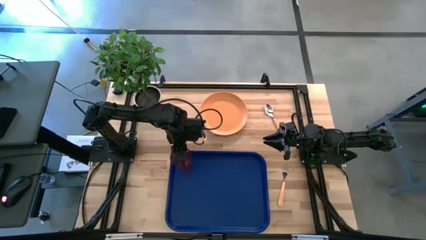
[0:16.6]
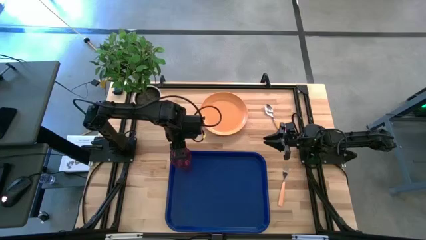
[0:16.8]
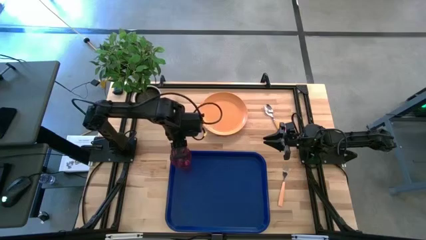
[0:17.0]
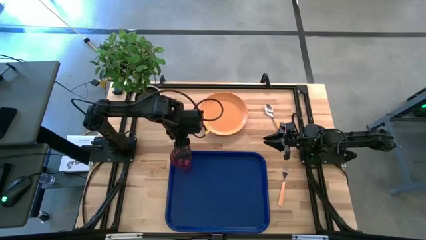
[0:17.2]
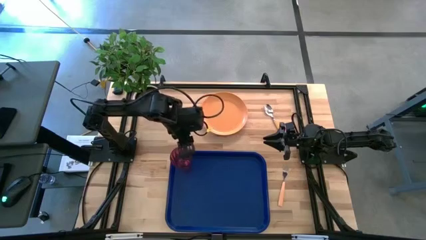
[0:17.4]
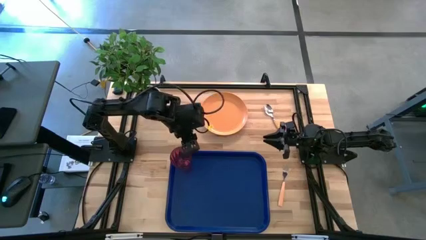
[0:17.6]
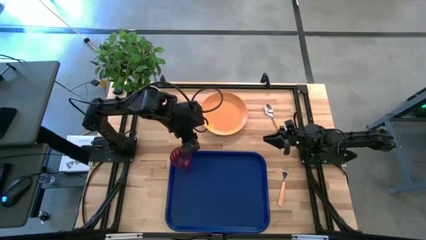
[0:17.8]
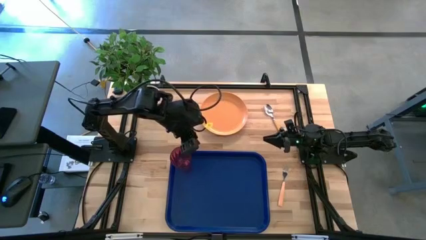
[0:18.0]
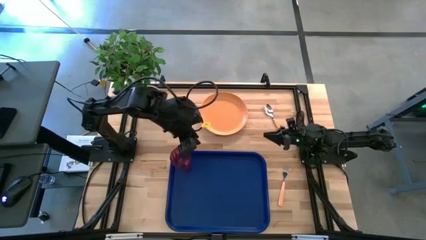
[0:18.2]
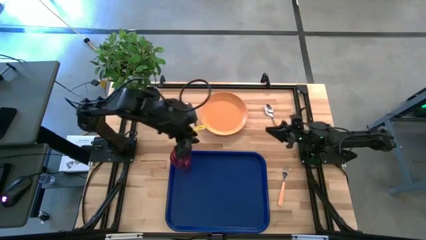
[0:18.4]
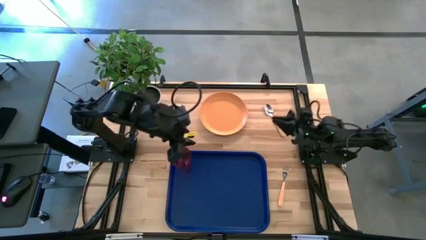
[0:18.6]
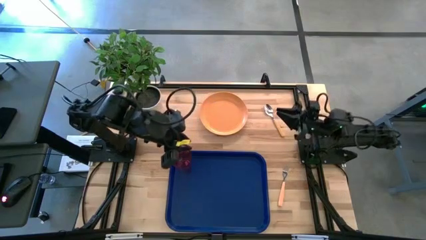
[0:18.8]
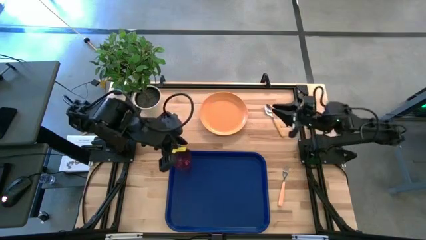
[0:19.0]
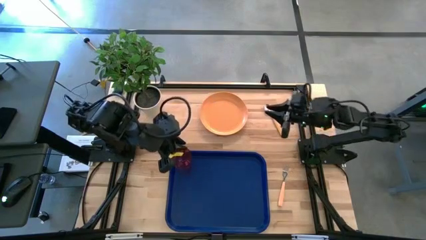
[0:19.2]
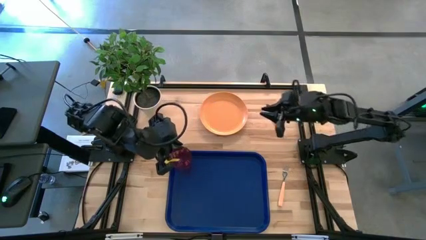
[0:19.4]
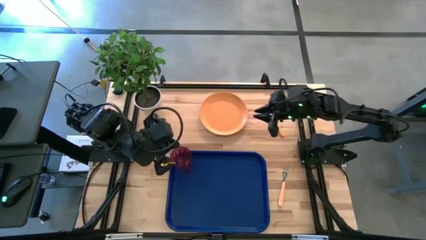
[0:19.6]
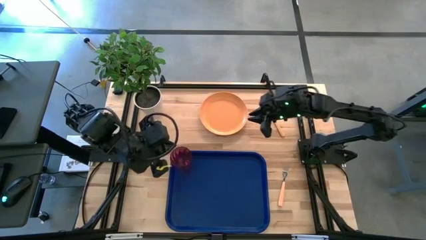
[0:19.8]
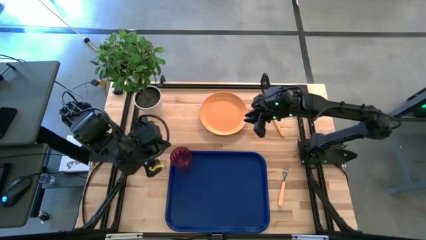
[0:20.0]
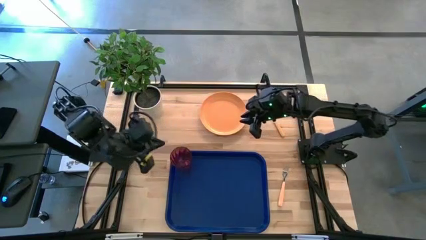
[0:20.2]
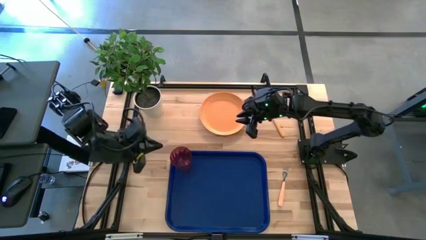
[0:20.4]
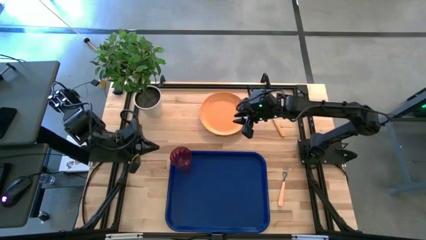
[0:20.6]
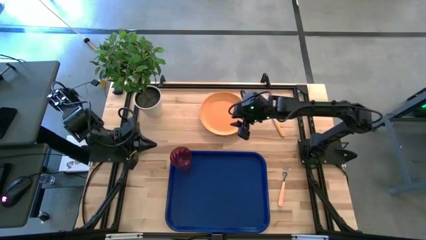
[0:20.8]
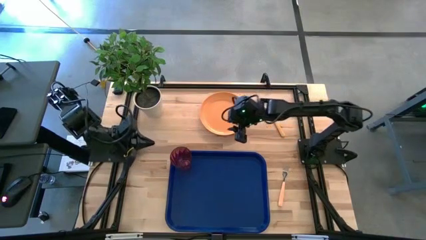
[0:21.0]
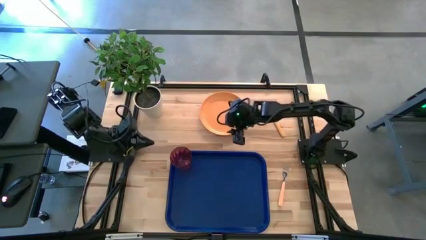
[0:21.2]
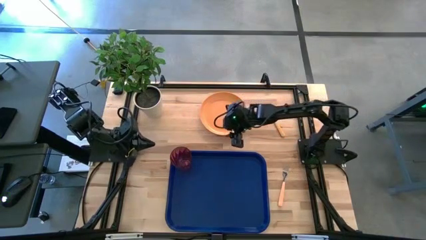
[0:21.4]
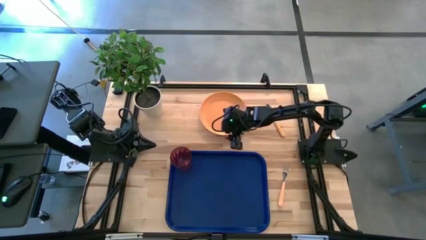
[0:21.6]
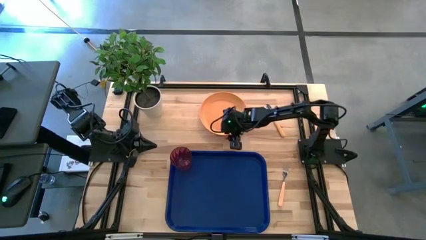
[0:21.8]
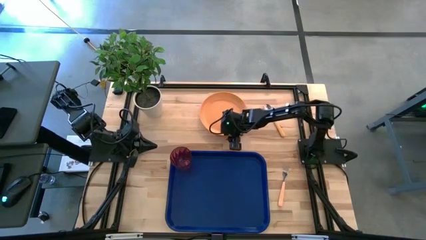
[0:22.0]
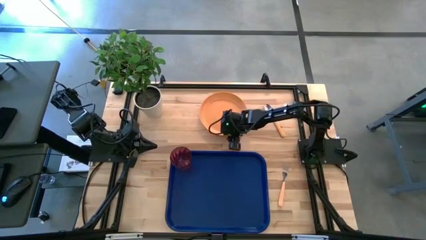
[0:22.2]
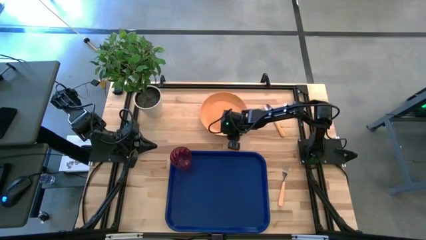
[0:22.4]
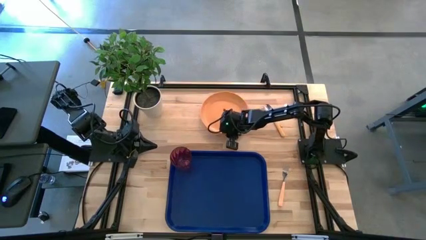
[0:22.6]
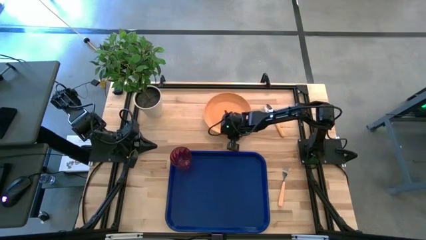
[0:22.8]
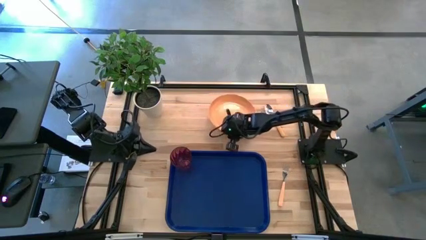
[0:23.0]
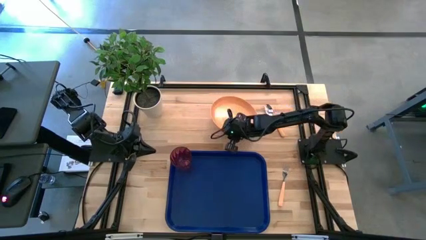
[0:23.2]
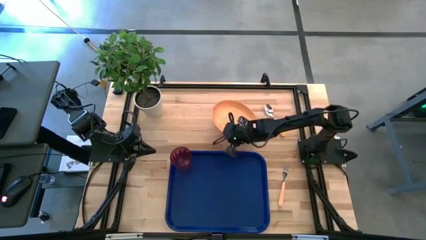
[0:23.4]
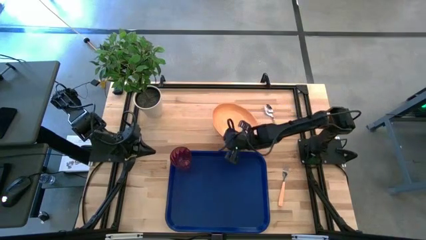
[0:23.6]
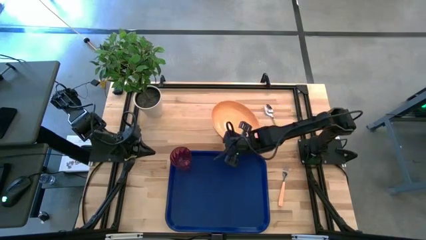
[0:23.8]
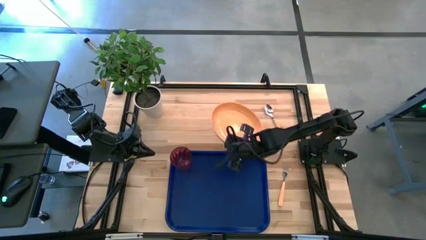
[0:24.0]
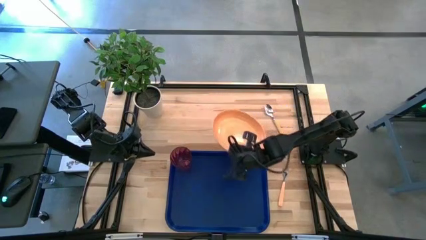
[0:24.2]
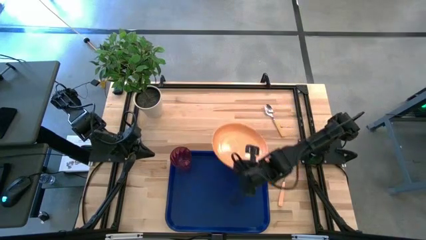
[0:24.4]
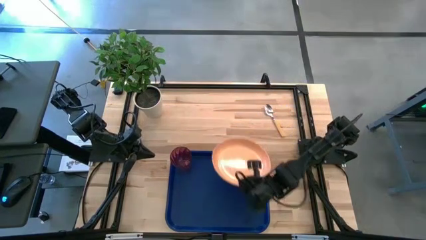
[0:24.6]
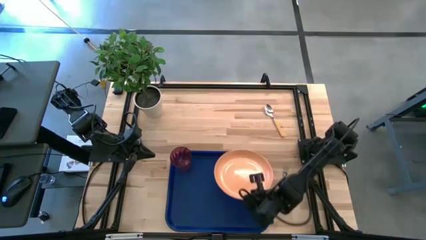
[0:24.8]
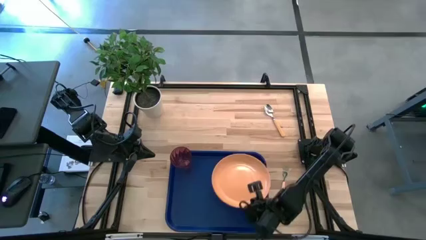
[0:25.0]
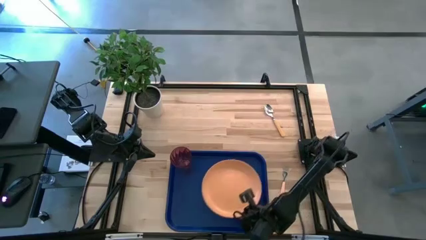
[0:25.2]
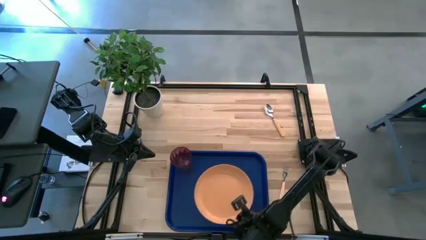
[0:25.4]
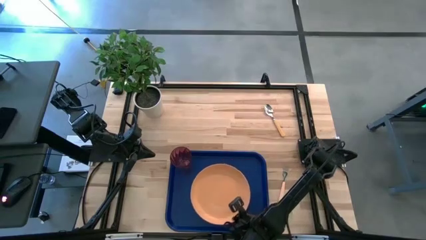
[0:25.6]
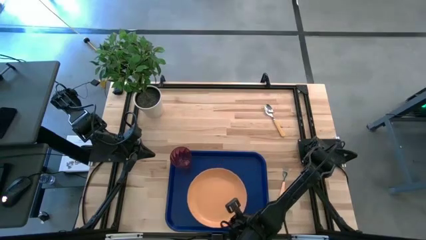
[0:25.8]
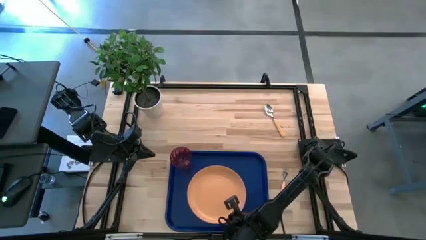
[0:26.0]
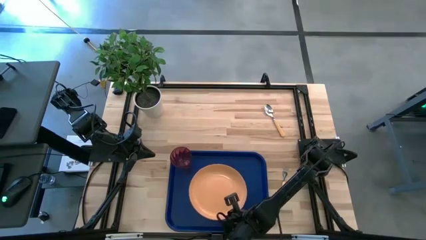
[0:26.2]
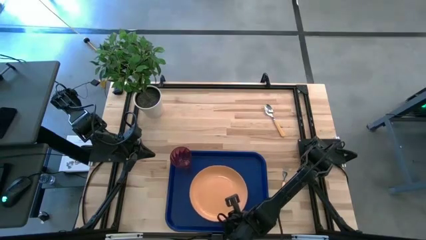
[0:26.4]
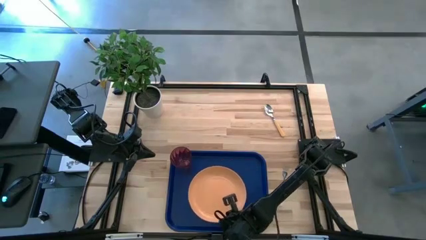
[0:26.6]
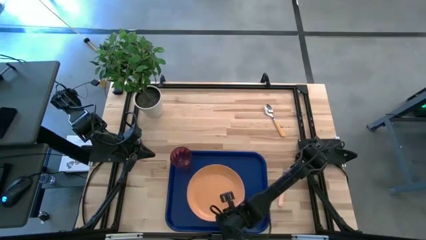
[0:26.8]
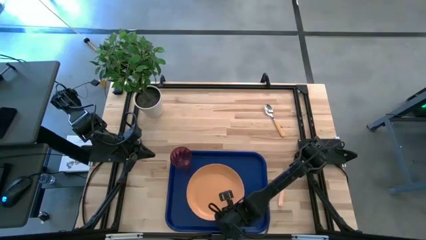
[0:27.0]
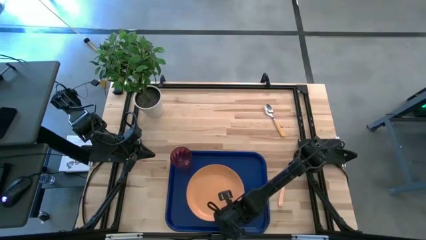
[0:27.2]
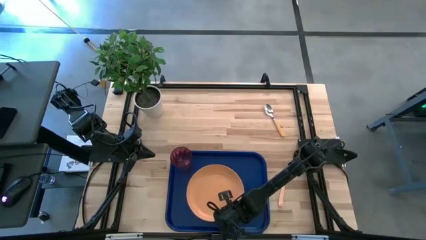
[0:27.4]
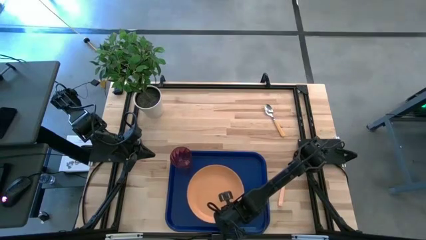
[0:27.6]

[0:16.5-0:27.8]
Task: Pick and place plate/cup/fork/spoon on tray
Put the orange plate on the blue serving tray to the bottom left of the purple cup

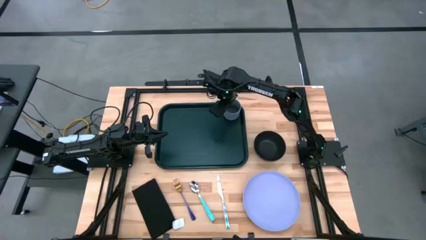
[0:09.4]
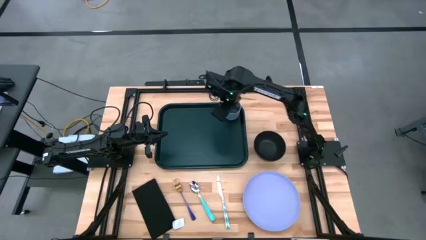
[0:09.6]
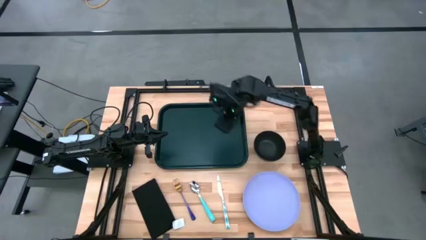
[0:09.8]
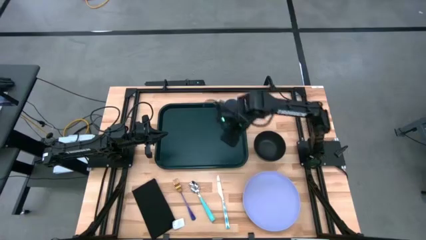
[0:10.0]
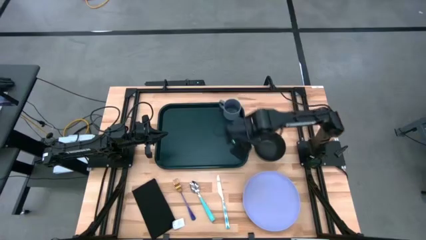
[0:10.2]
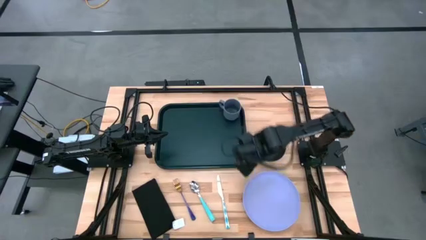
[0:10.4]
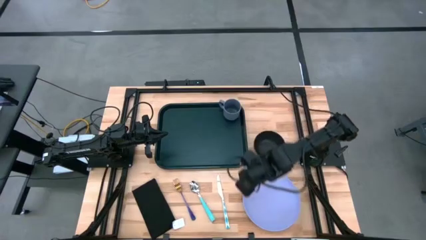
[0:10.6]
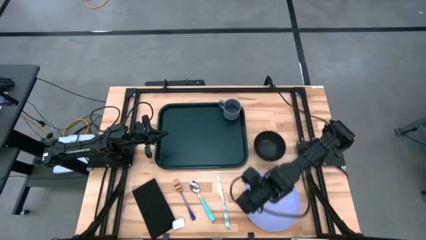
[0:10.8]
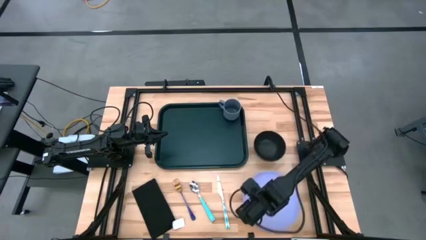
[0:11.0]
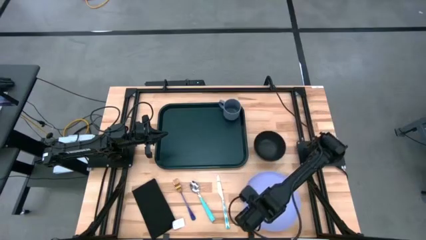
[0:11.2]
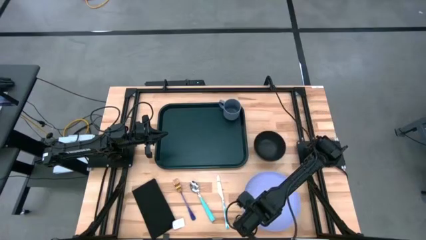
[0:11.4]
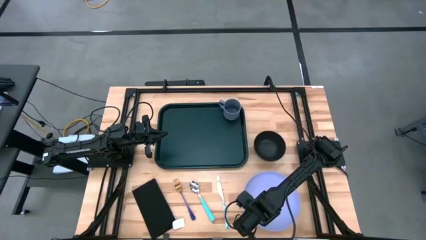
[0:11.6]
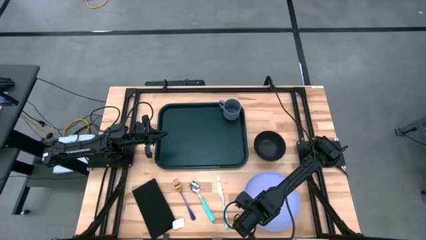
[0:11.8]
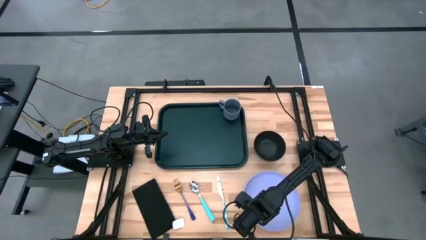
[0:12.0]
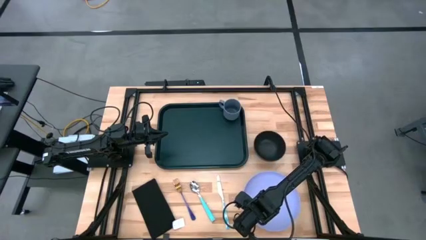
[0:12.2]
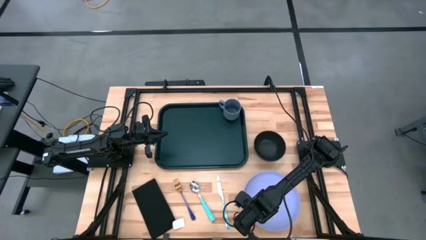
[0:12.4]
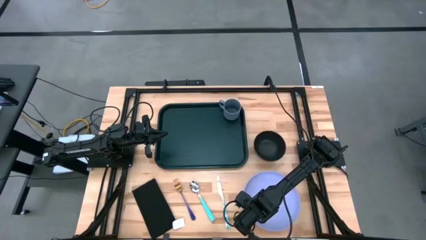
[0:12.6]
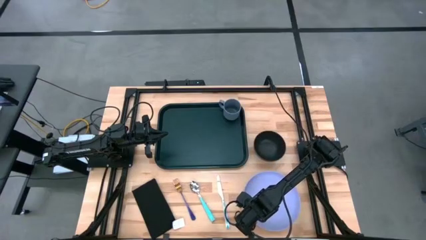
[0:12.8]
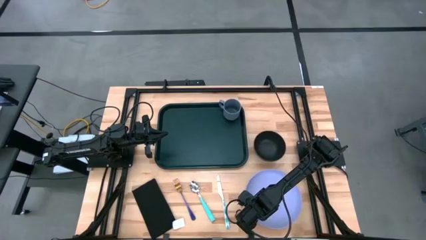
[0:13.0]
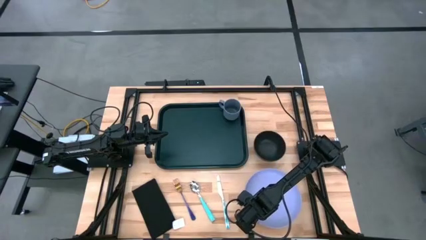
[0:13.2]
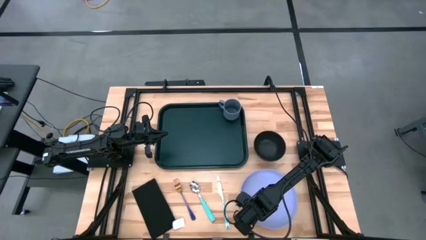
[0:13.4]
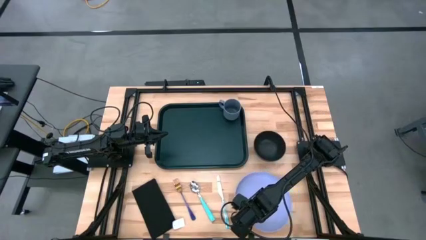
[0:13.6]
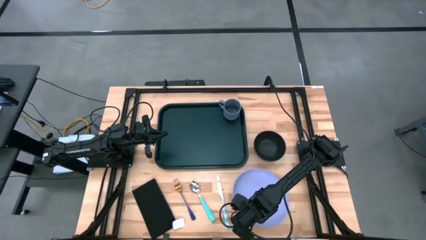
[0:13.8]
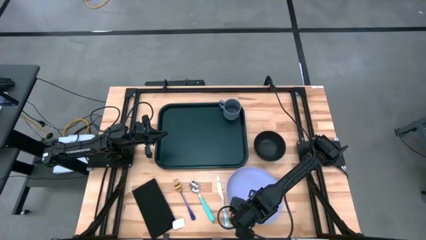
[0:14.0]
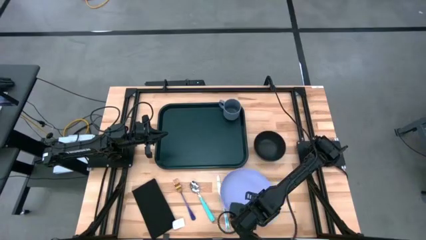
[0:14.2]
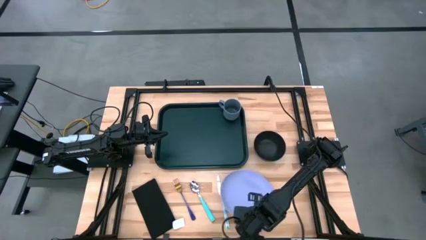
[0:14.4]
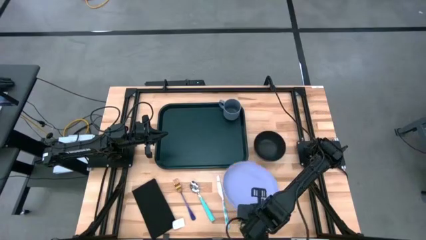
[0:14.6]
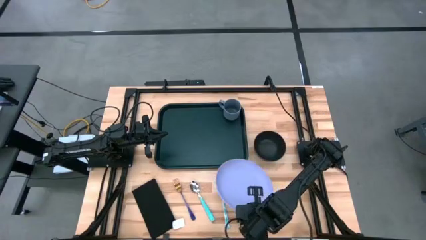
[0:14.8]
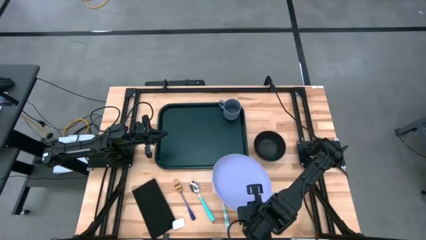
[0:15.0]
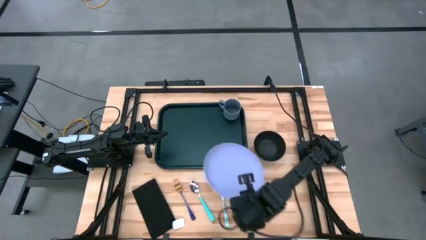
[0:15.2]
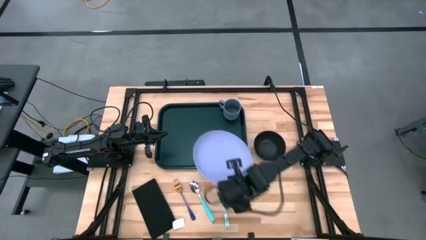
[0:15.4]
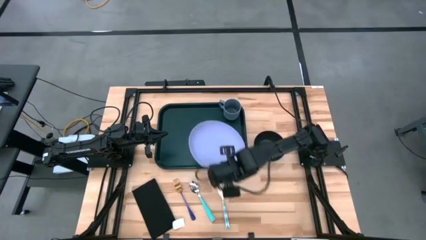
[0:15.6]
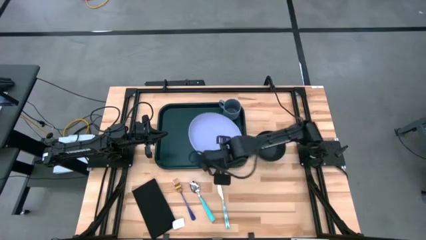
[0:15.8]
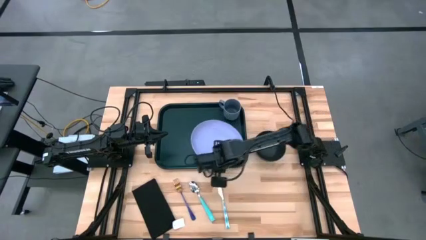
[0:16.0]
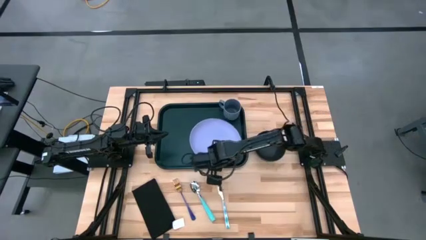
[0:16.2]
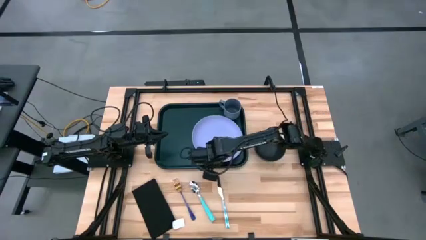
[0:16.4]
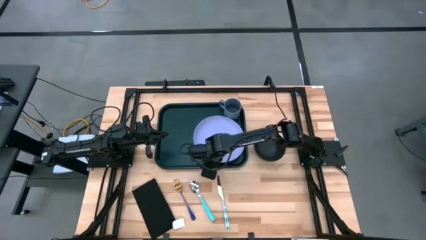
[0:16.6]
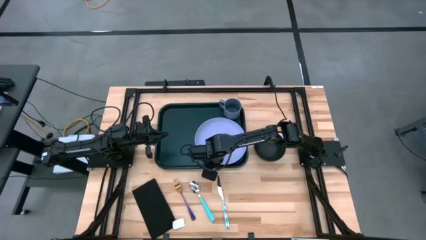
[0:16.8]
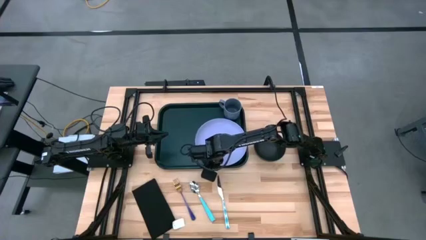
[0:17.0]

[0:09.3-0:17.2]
Task: Set up tray
Put the purple plate on the black serving tray
